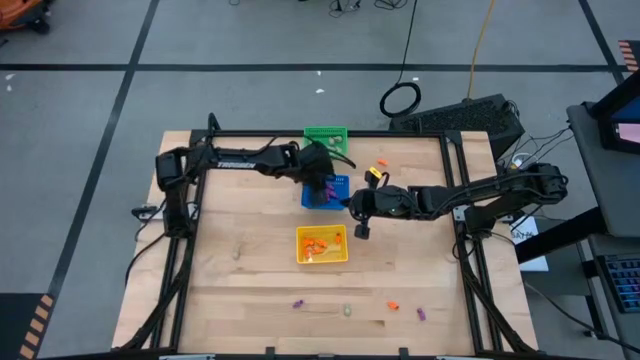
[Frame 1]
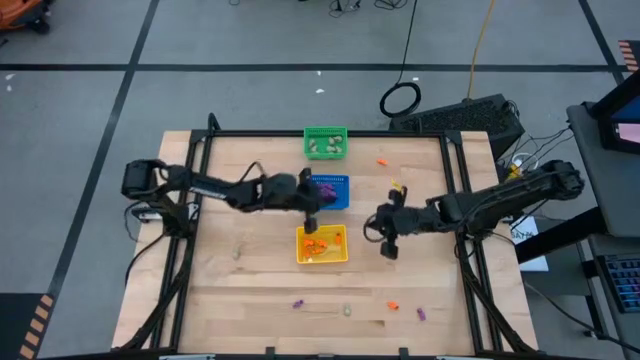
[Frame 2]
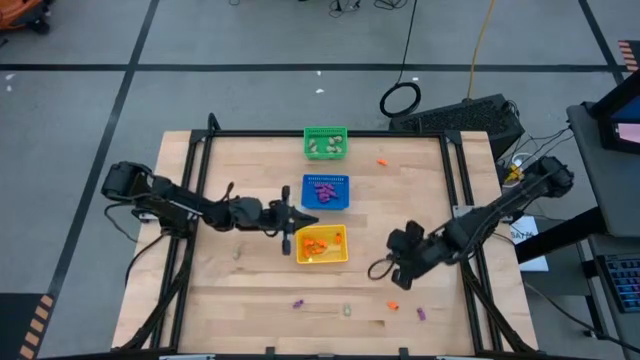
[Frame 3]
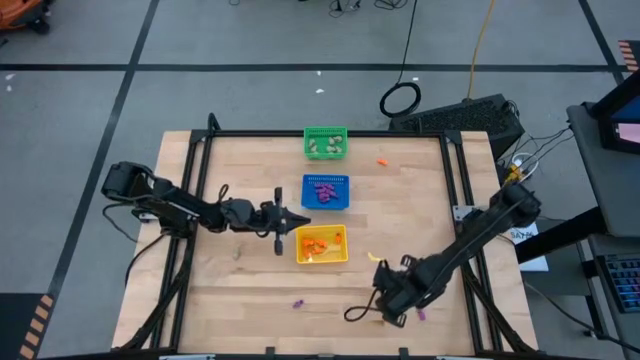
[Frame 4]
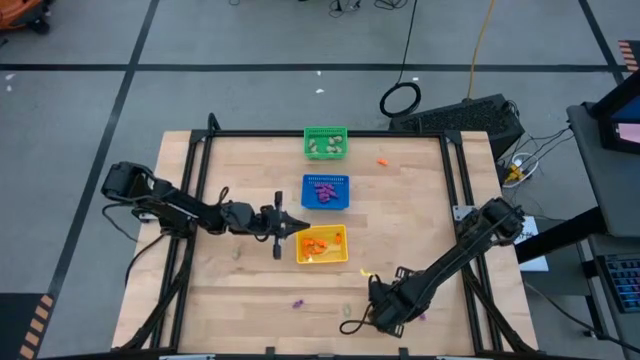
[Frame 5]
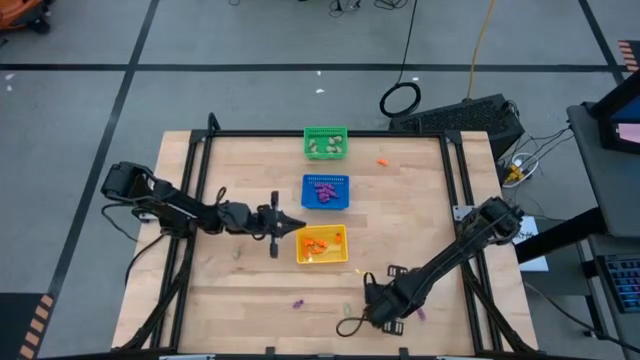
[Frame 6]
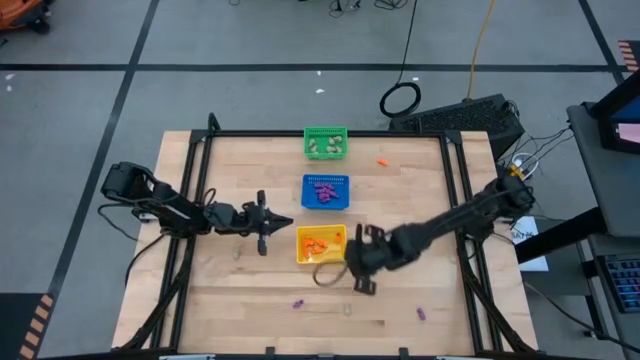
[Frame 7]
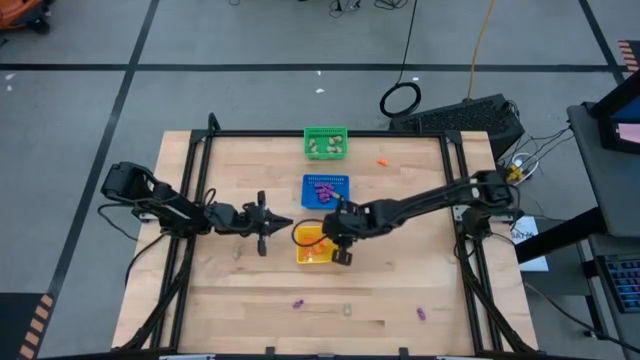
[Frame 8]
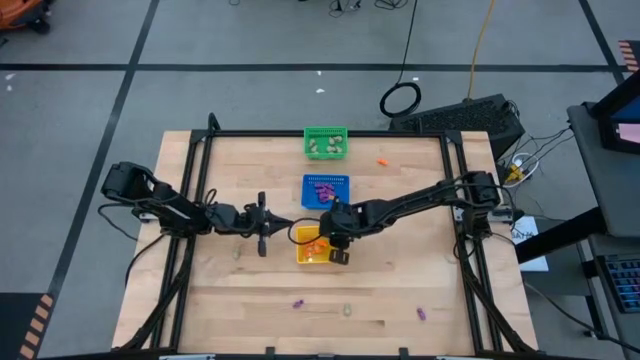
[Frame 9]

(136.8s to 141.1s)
Task: Sort Halloween decoration
Put the orange skeleton toy into the yellow bin

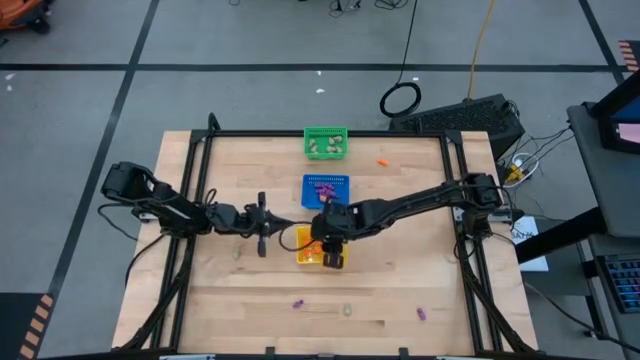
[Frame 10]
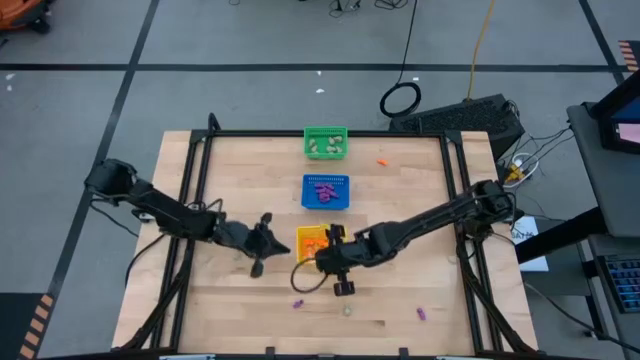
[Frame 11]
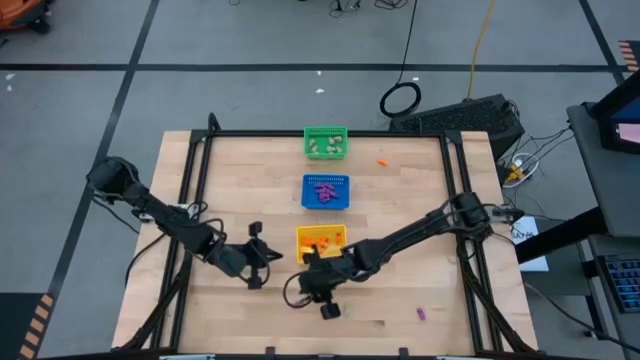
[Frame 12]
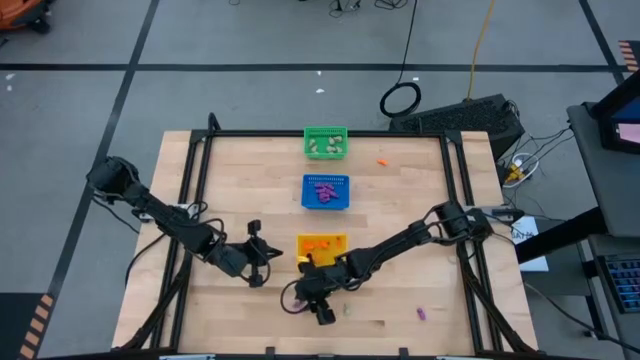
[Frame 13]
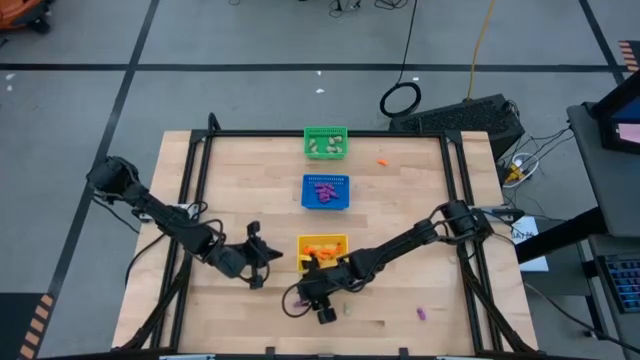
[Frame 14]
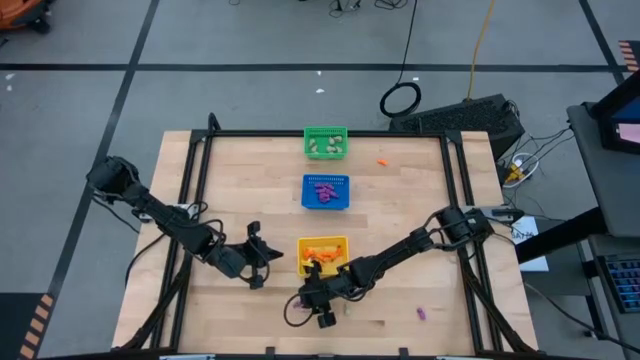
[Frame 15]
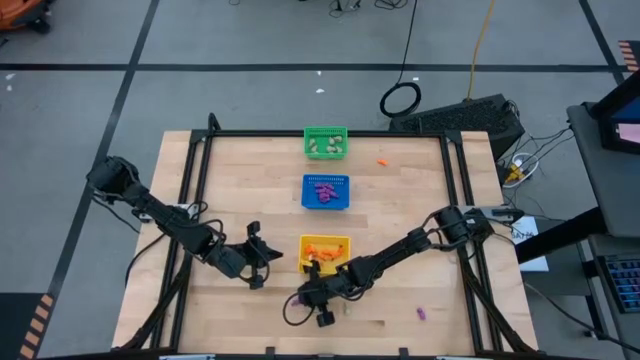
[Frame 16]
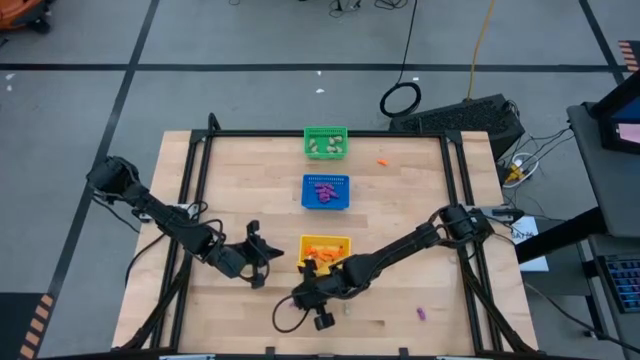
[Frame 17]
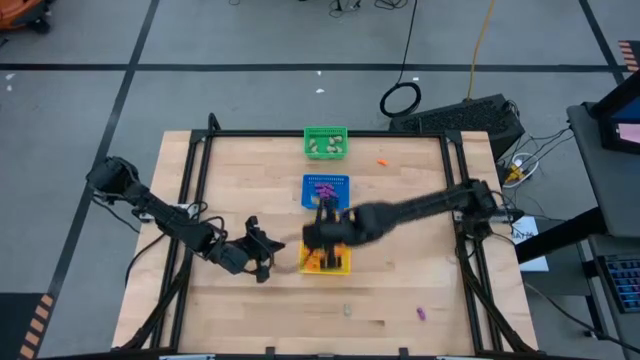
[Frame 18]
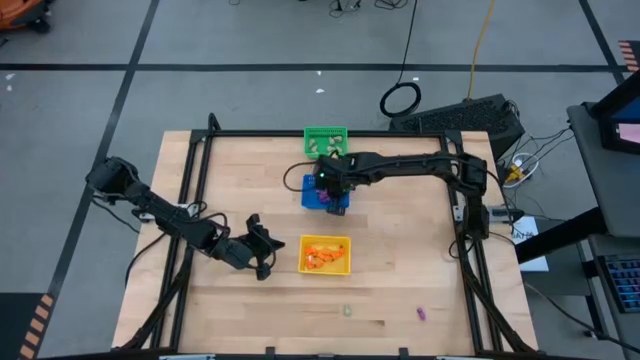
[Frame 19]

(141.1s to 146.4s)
Put the purple skeleton toy into the blue bin

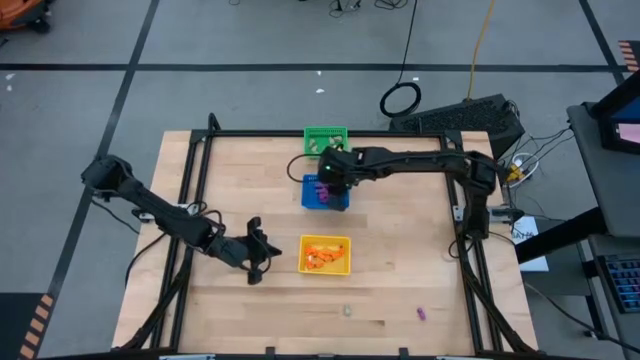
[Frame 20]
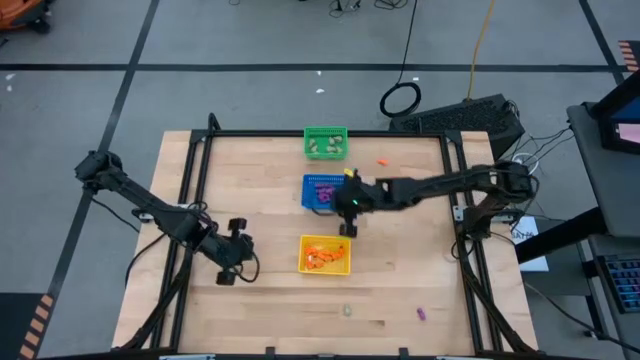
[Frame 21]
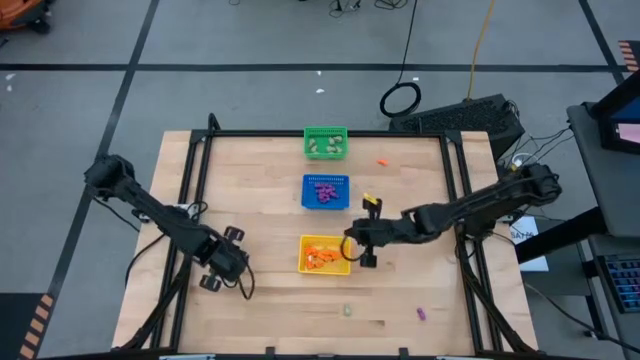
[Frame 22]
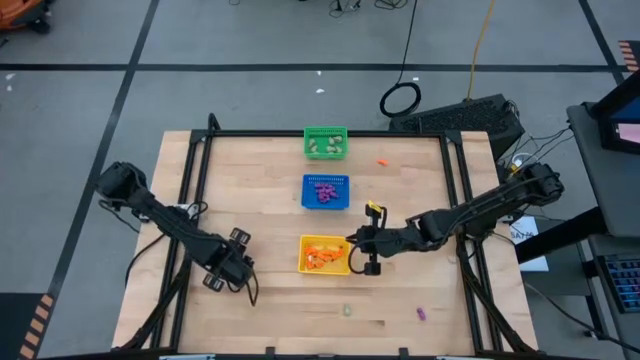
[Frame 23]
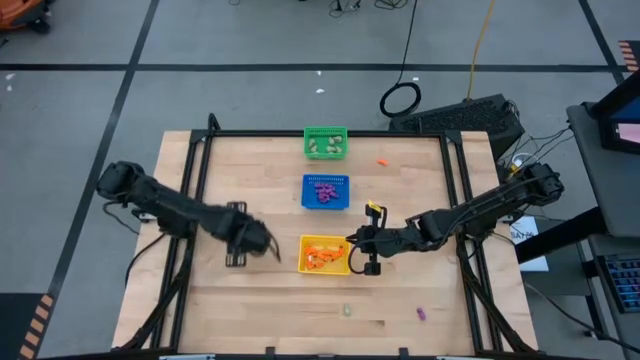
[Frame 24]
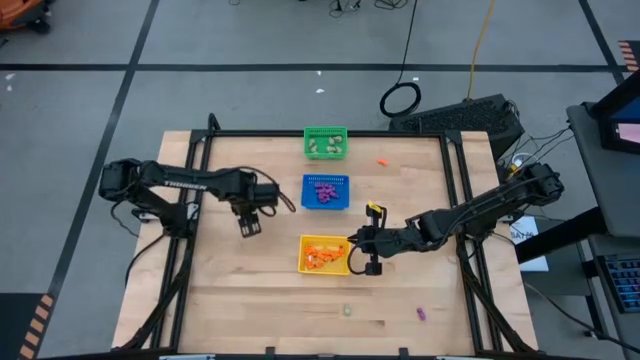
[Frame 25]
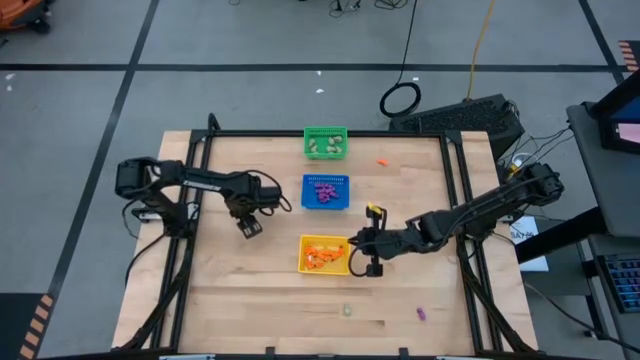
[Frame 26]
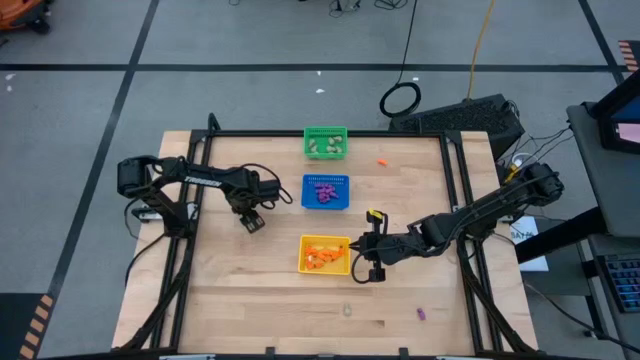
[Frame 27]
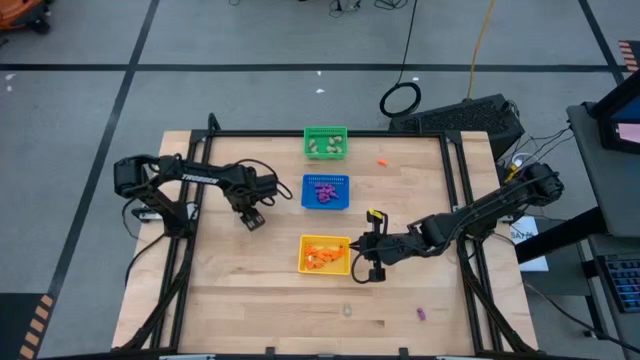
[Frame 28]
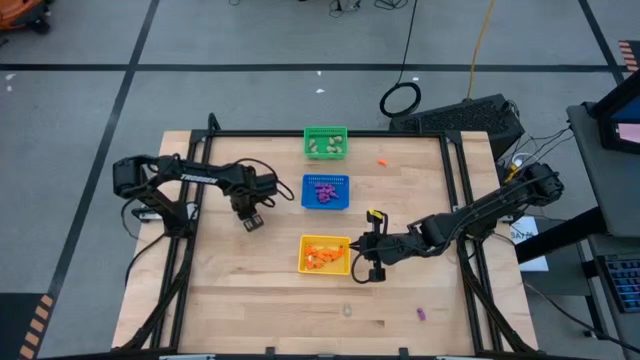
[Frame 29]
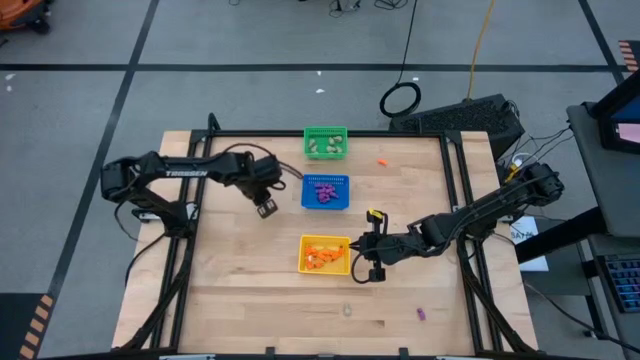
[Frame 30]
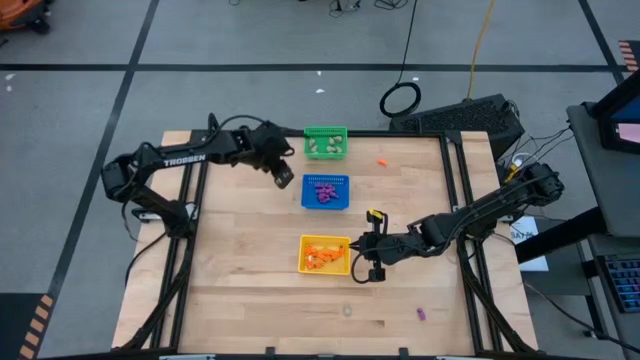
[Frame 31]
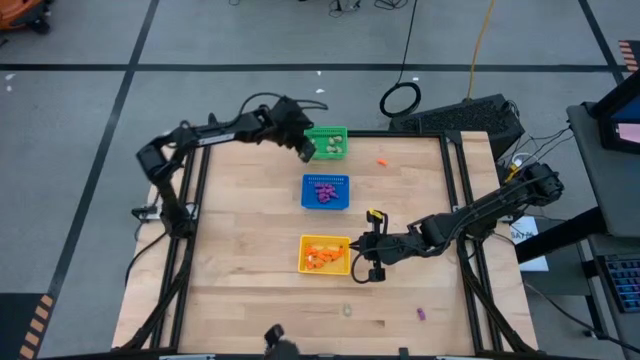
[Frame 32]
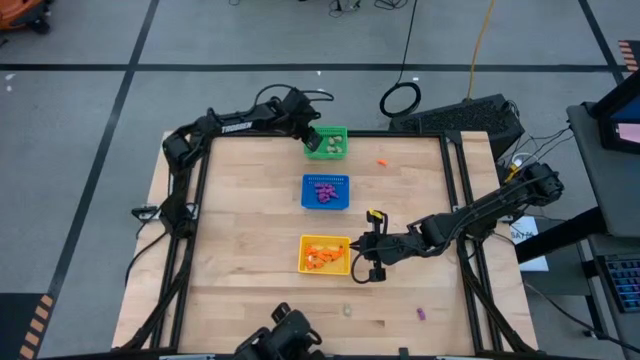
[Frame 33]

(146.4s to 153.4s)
Put the white skull toy into the green bin

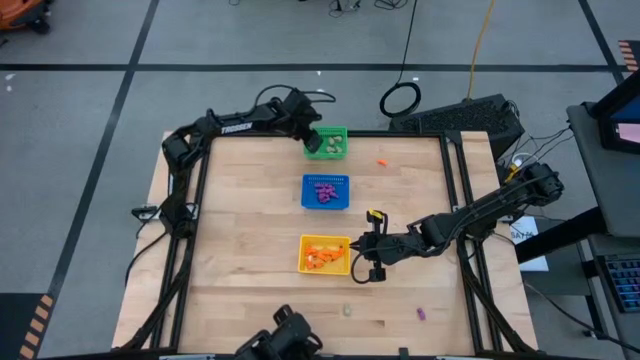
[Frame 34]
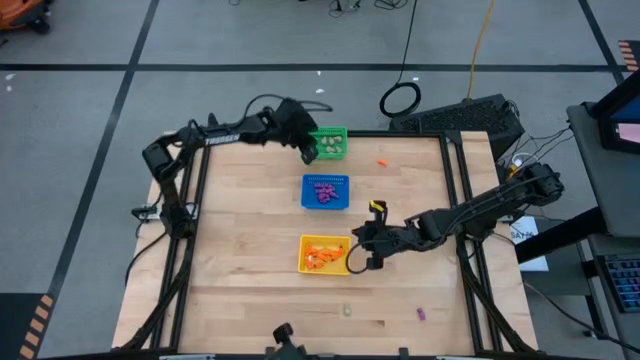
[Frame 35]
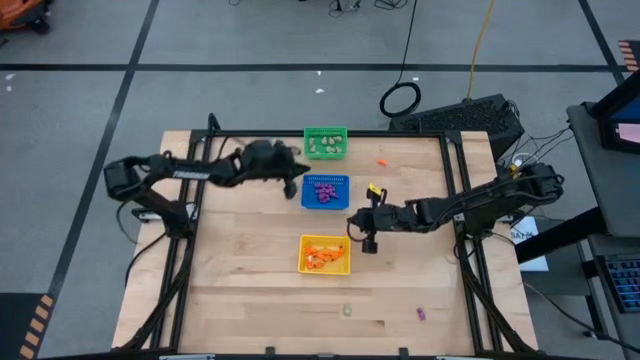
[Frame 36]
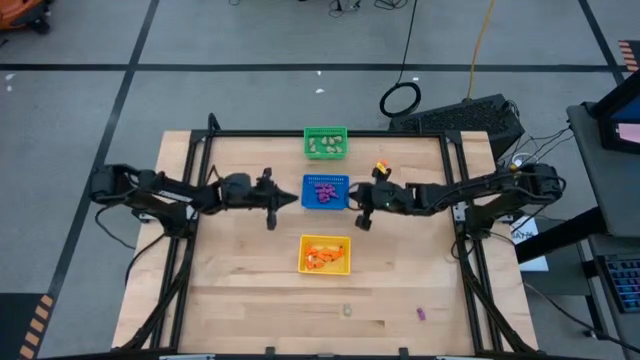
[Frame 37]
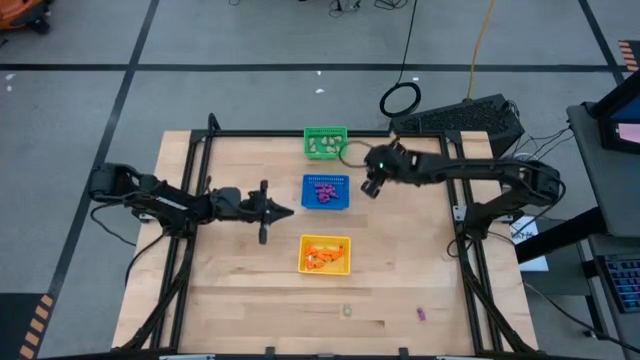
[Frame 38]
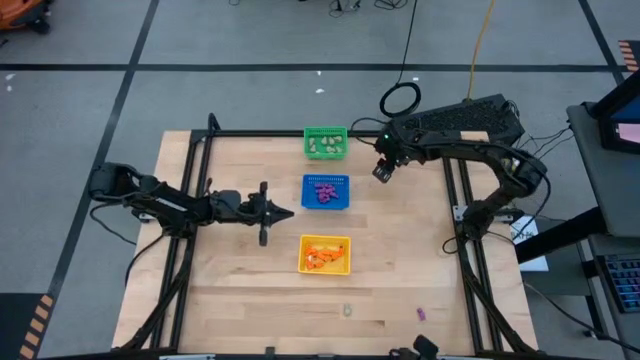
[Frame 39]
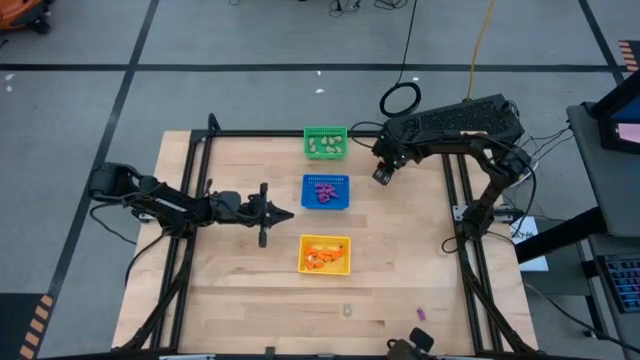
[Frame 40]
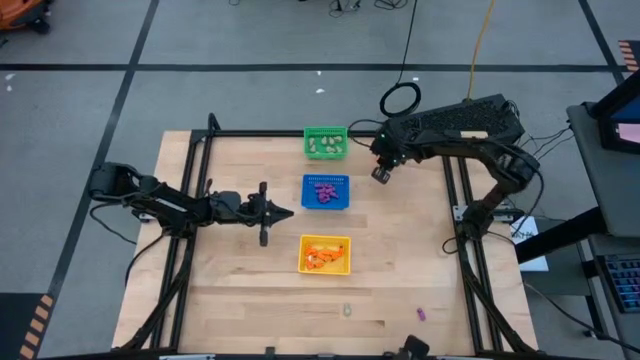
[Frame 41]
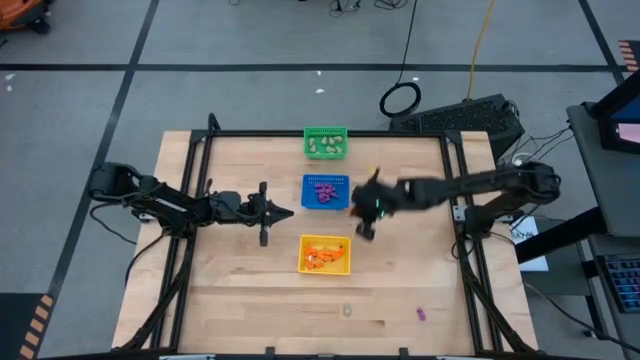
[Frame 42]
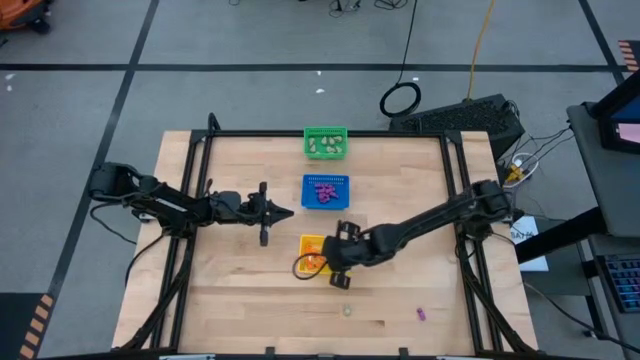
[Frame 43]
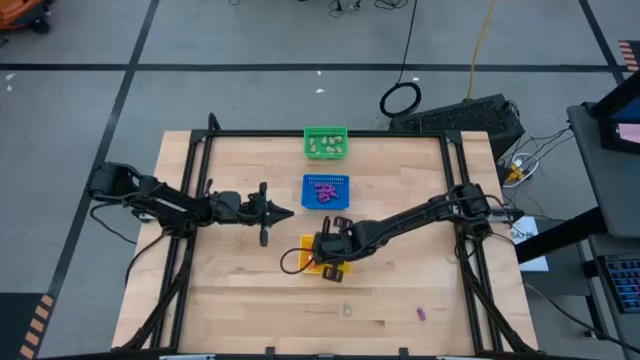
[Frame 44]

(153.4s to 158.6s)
Put the orange skeleton toy into the yellow bin
